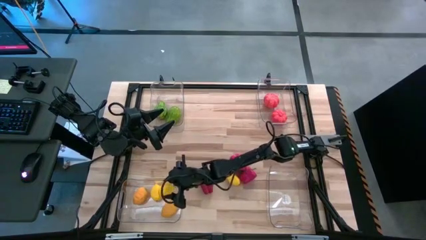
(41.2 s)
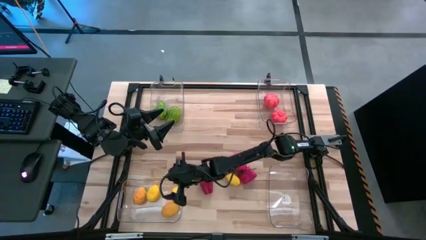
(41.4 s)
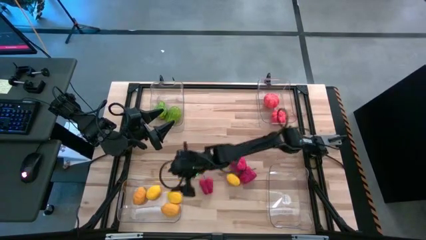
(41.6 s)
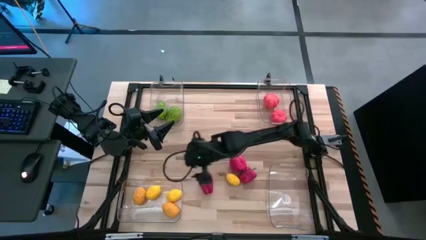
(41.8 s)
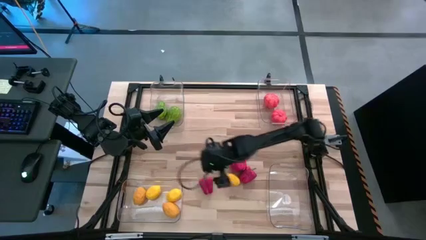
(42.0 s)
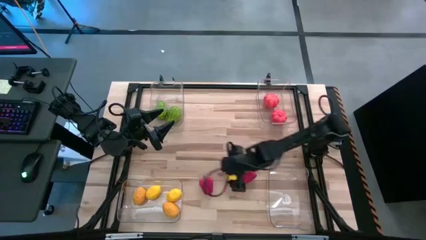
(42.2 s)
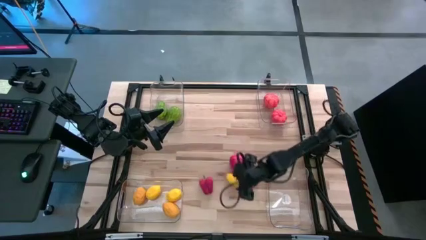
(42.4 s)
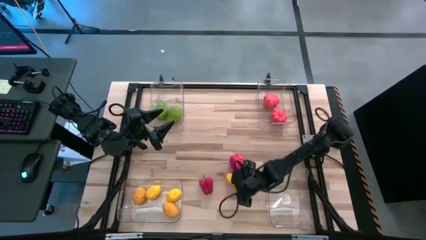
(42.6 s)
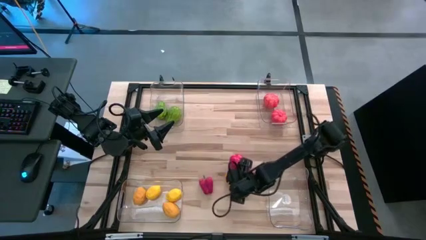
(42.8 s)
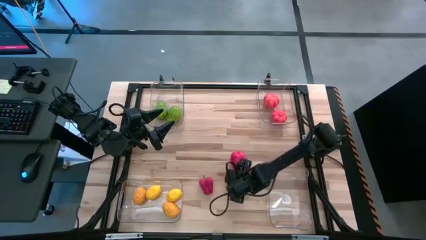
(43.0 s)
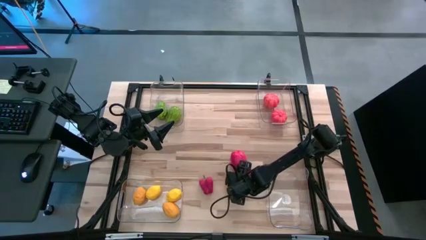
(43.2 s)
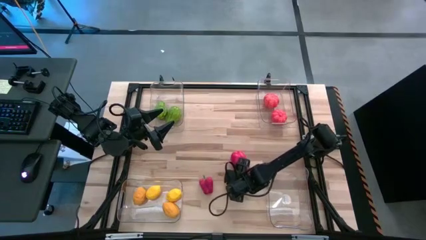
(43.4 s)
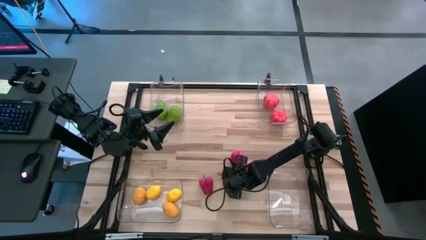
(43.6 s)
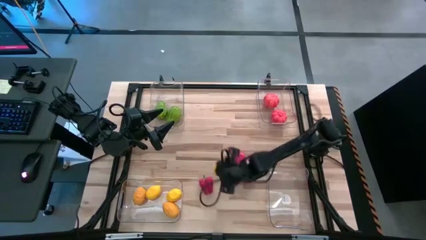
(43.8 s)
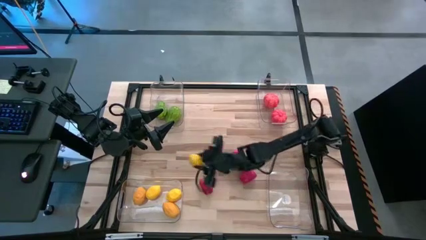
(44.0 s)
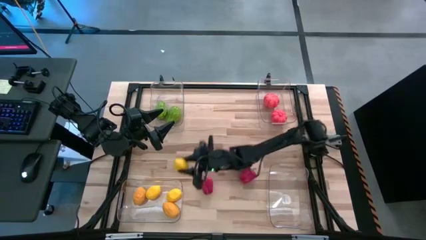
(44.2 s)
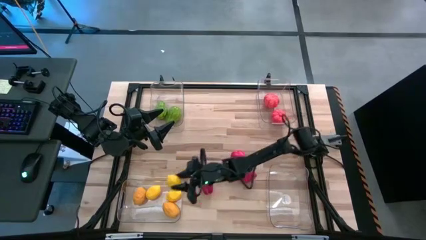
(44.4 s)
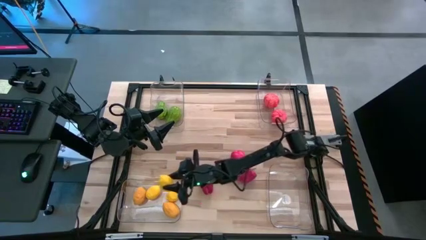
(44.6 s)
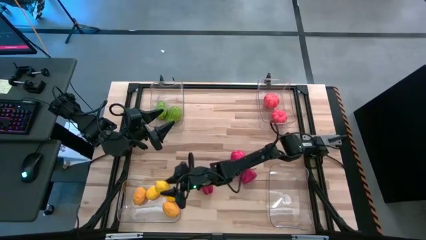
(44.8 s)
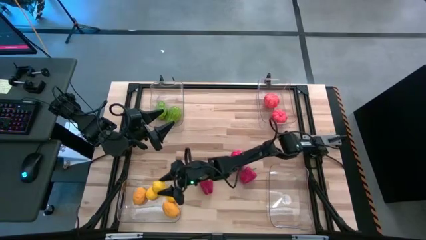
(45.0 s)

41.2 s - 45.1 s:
Task: Sort produce into baskets
Put the yellow lemon into the bottom left transparent bin

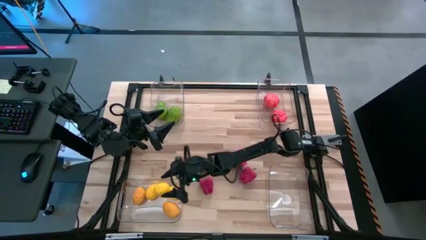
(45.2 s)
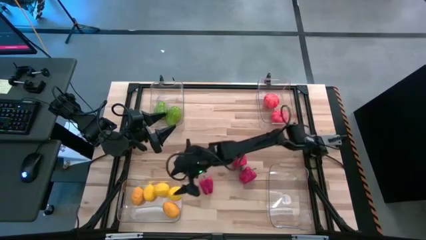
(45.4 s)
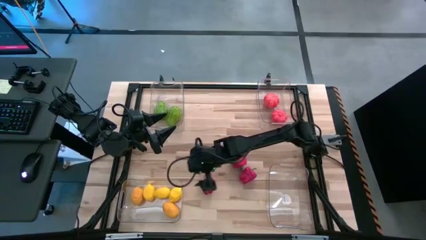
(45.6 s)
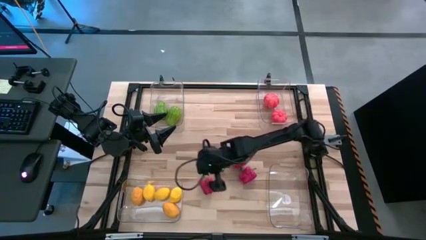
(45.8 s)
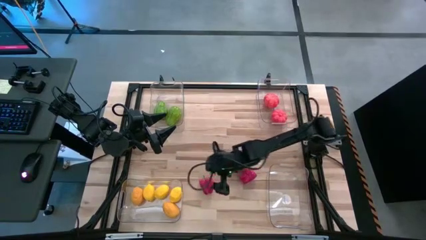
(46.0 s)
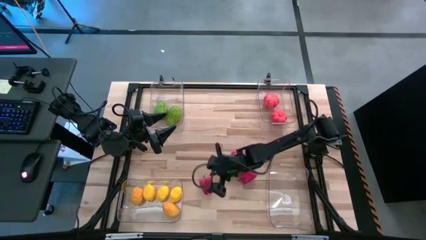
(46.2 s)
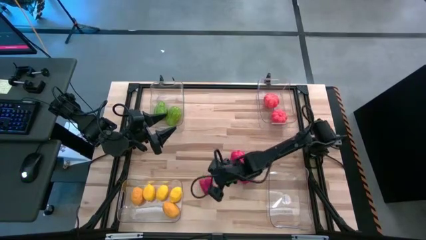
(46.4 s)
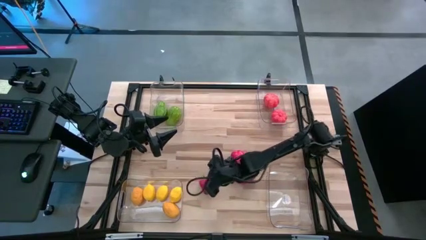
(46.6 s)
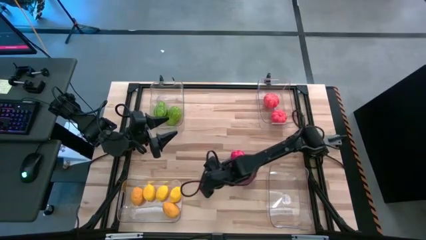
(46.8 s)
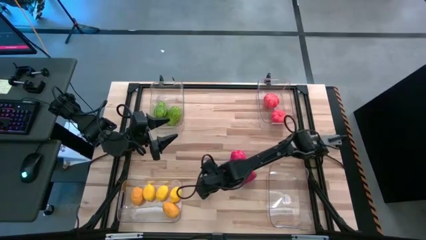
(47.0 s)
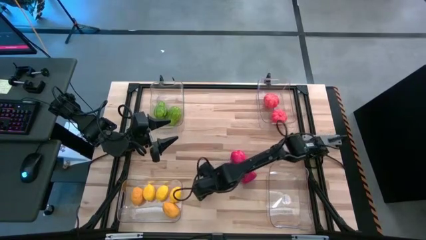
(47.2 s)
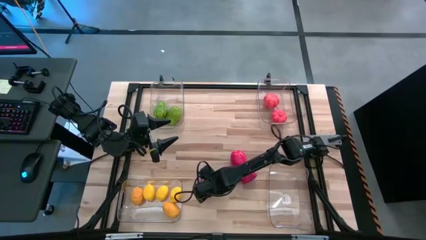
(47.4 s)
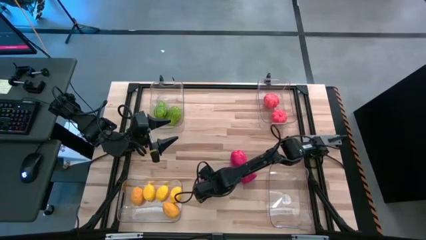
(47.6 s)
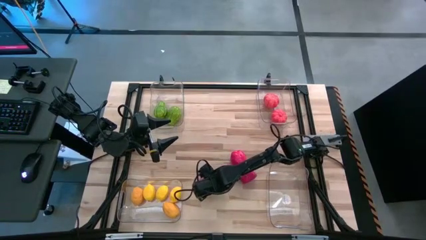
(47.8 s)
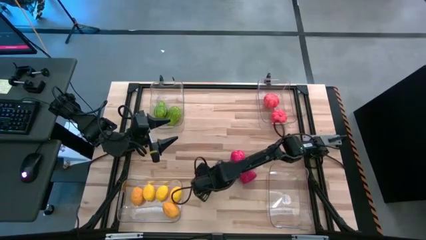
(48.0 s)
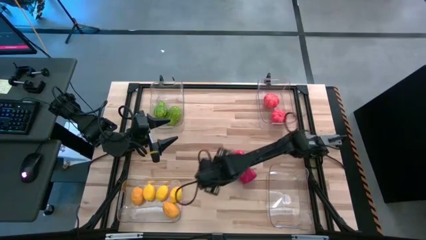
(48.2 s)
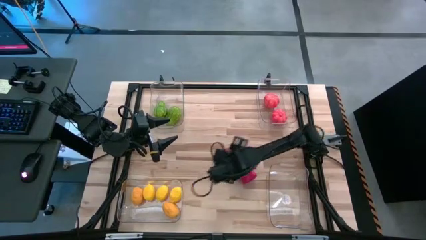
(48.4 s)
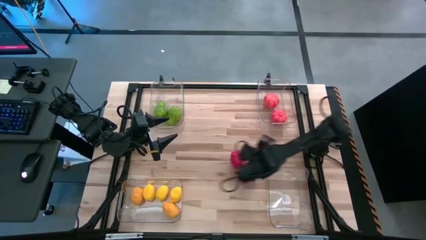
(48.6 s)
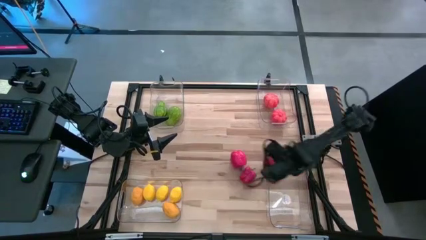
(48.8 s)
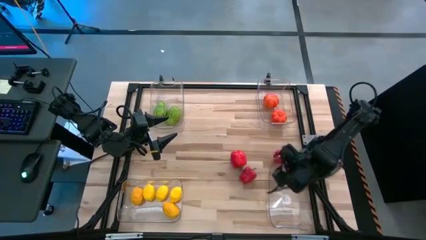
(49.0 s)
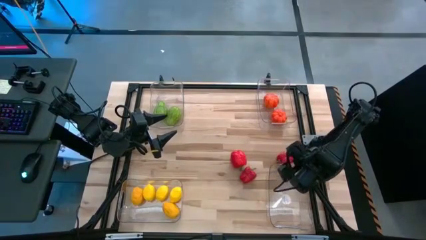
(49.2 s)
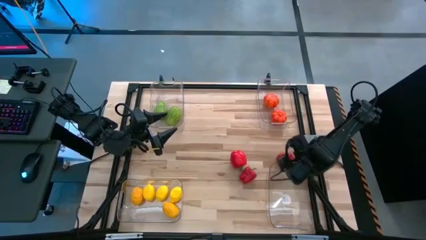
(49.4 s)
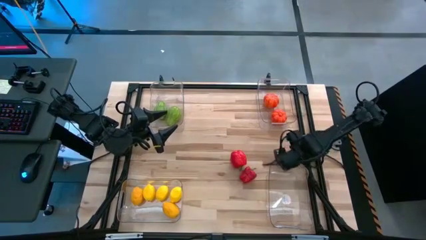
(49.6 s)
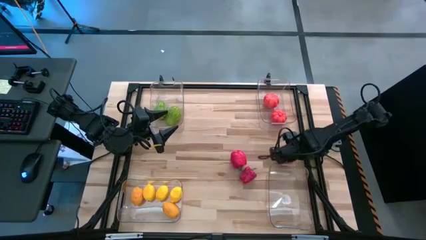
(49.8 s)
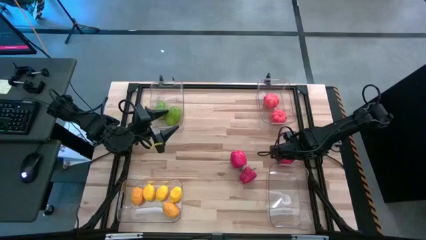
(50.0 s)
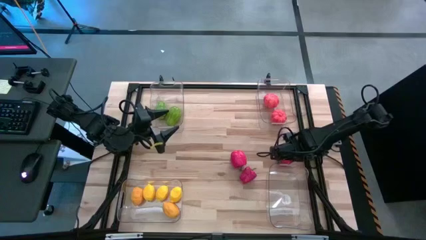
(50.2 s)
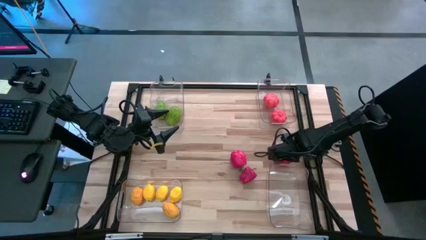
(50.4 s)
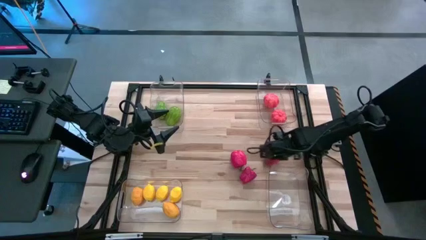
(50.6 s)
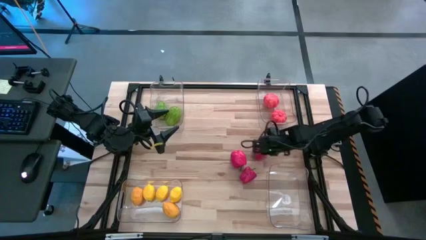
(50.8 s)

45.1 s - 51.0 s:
Put the red bell pepper into the bottom right transparent bin

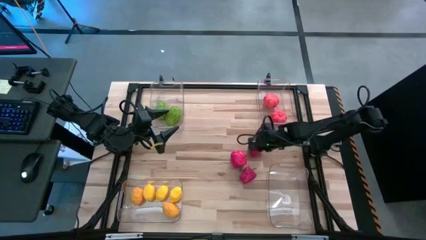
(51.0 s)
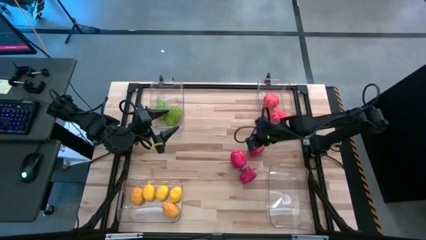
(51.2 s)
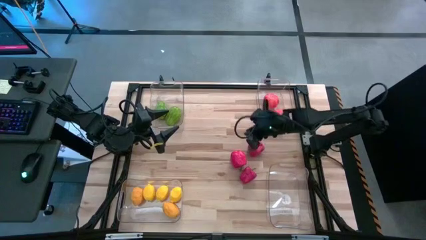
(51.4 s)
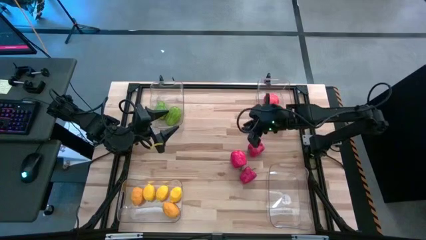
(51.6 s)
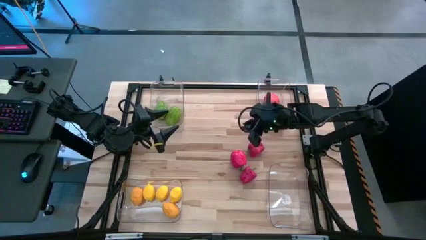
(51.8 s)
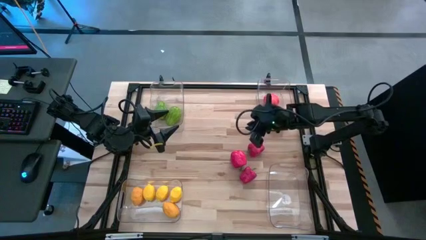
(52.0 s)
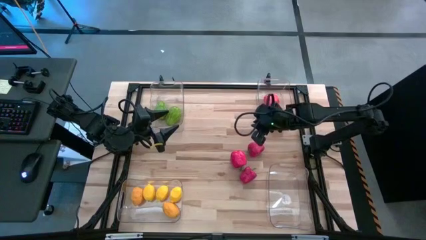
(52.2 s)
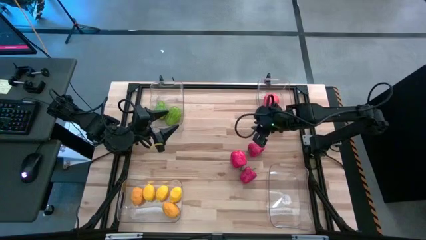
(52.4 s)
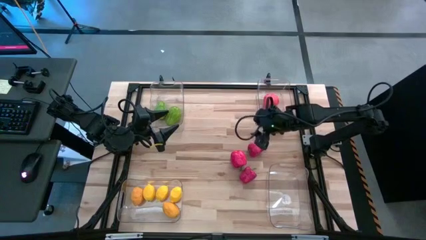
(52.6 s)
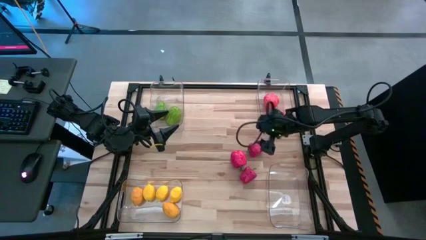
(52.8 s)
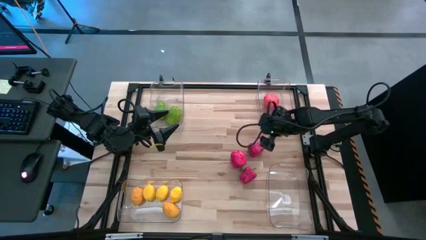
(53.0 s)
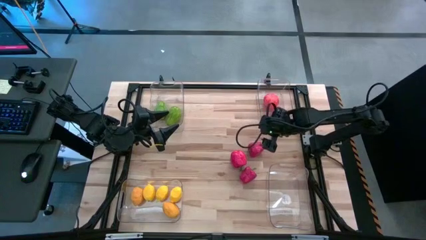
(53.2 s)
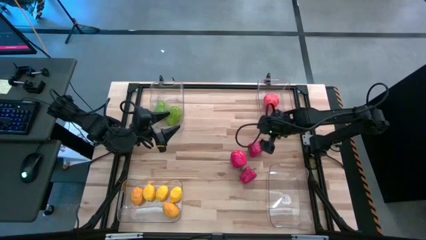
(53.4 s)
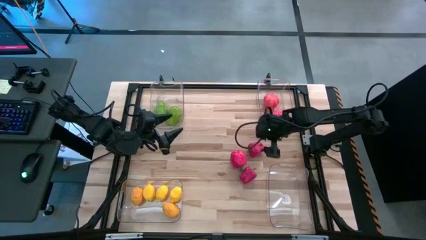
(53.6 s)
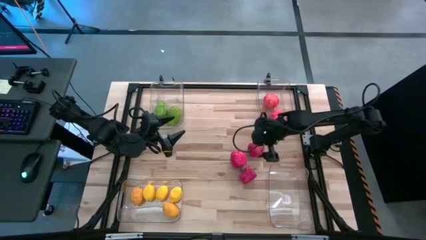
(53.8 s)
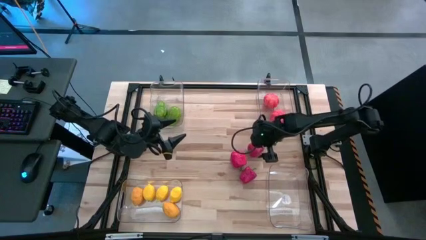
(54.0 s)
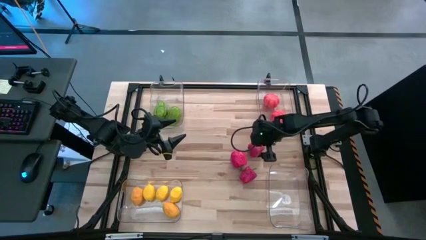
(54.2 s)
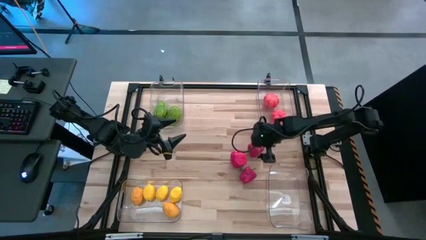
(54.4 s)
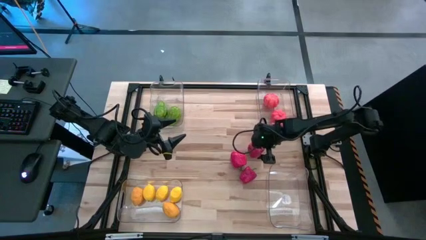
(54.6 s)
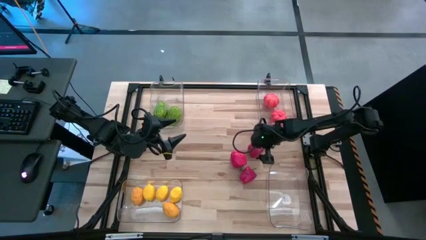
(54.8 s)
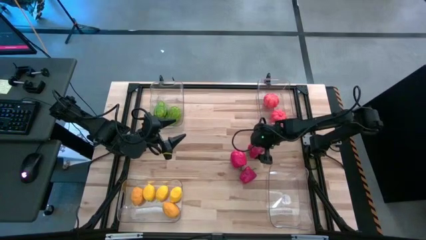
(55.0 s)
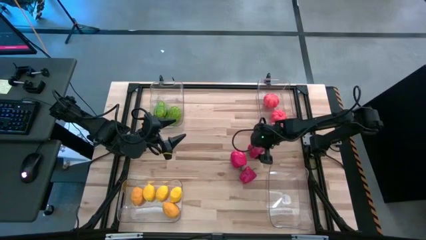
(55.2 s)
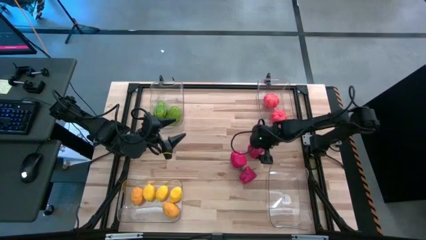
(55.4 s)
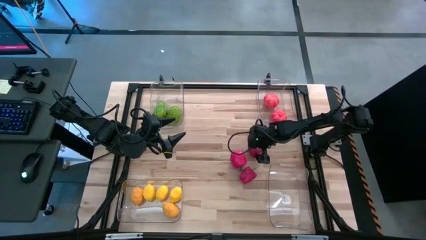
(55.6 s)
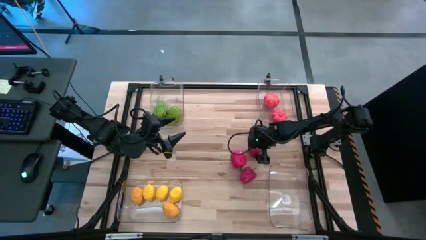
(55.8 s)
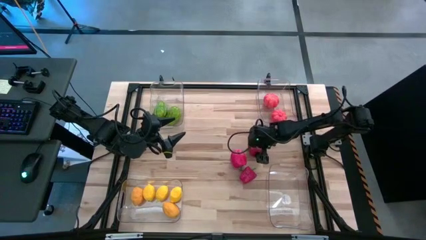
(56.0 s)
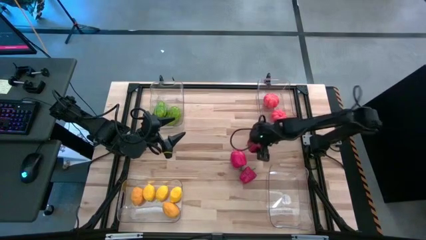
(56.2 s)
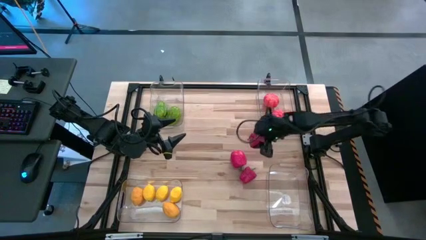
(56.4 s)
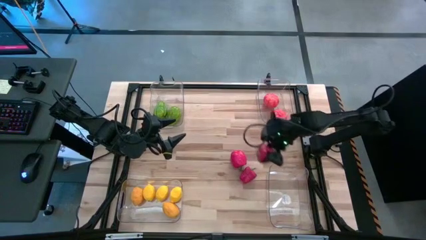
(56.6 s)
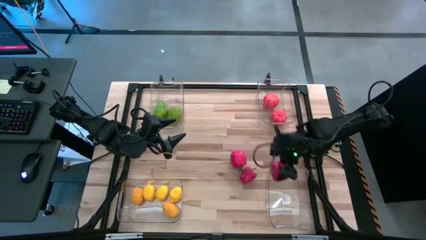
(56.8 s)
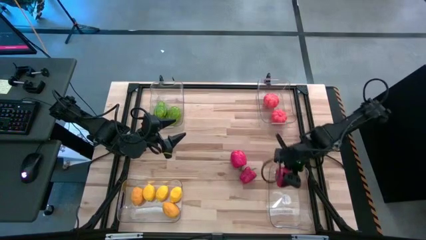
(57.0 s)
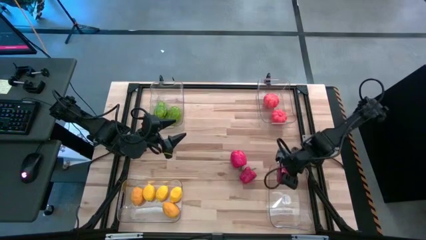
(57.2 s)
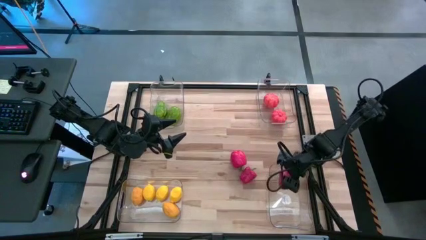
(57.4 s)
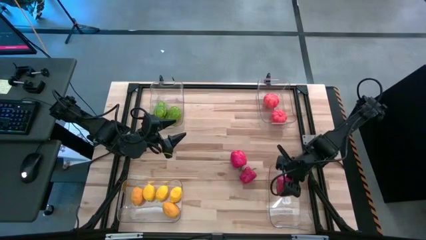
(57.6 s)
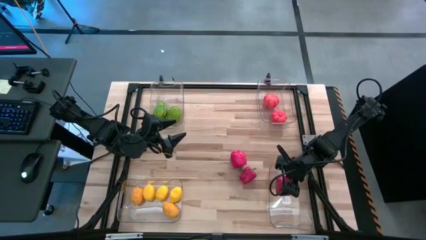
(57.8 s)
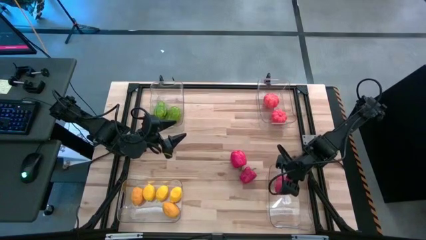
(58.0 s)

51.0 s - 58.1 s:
Put the red bell pepper into the bottom right transparent bin
